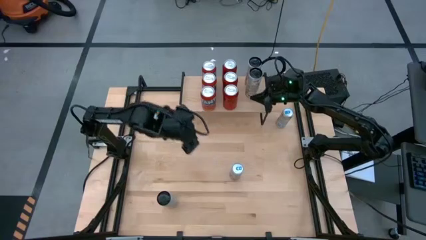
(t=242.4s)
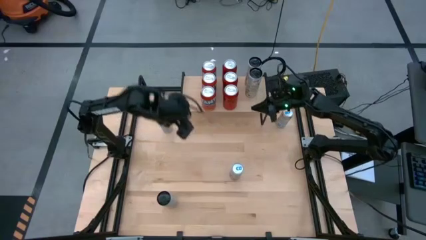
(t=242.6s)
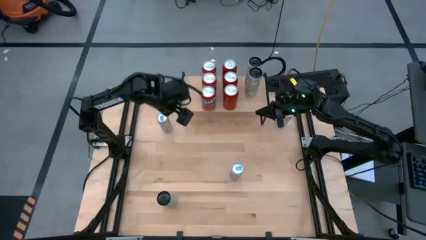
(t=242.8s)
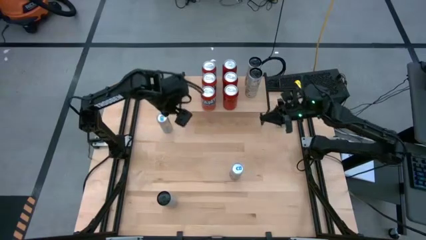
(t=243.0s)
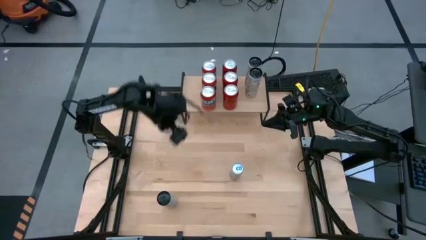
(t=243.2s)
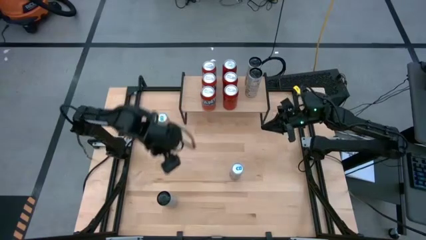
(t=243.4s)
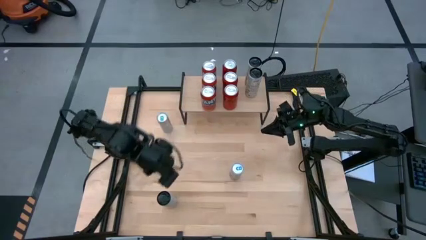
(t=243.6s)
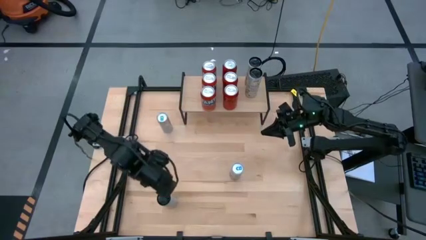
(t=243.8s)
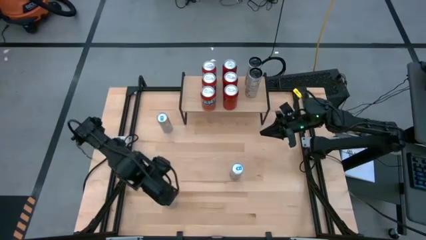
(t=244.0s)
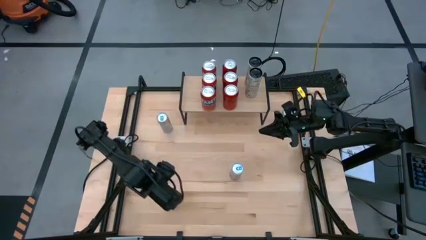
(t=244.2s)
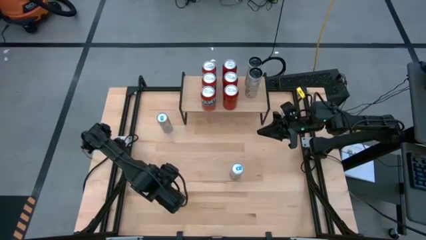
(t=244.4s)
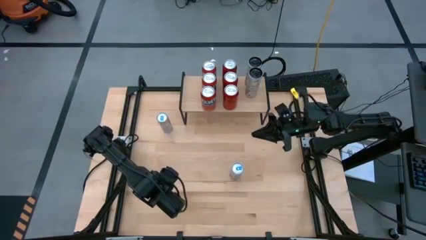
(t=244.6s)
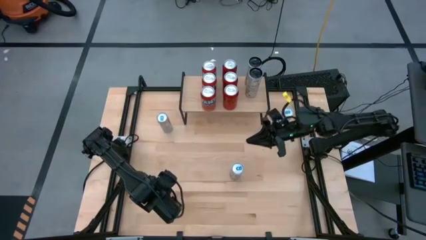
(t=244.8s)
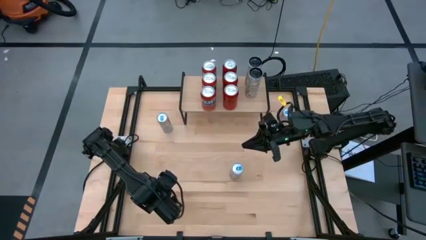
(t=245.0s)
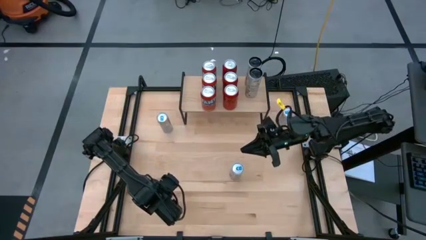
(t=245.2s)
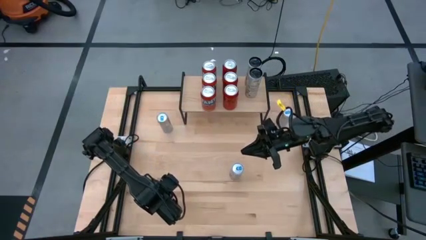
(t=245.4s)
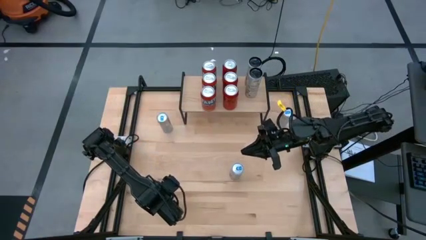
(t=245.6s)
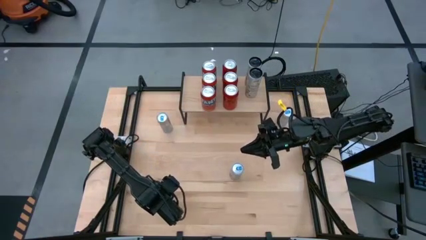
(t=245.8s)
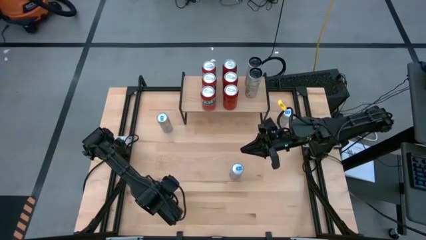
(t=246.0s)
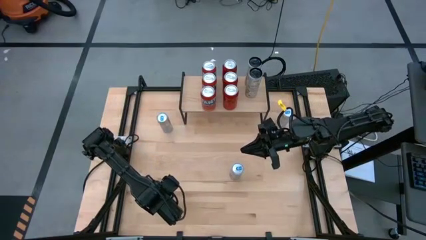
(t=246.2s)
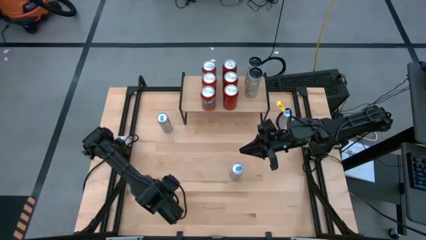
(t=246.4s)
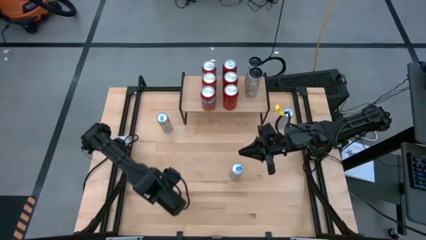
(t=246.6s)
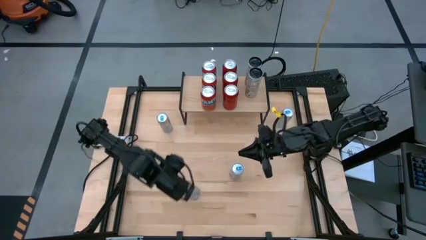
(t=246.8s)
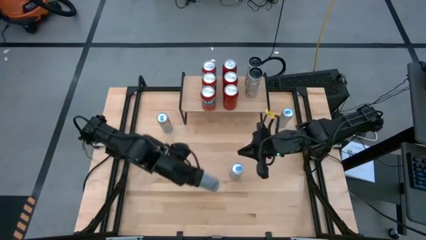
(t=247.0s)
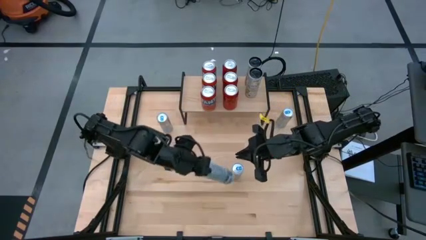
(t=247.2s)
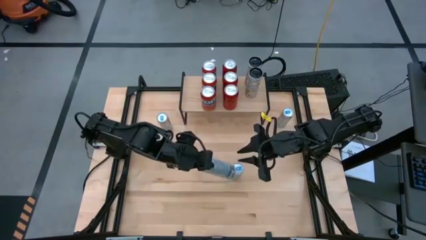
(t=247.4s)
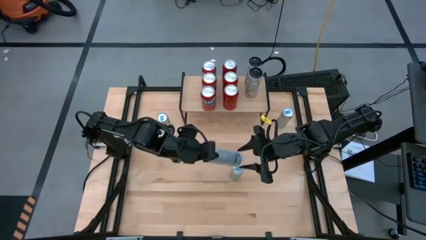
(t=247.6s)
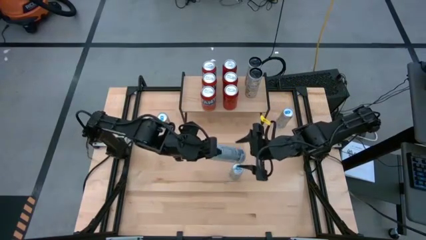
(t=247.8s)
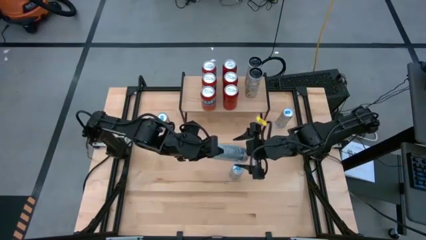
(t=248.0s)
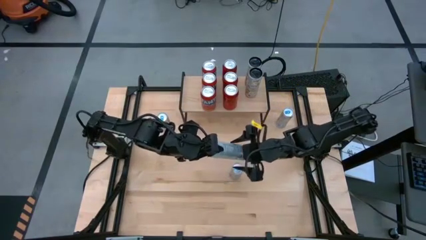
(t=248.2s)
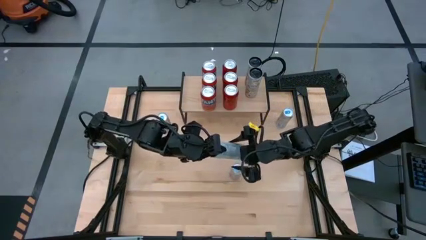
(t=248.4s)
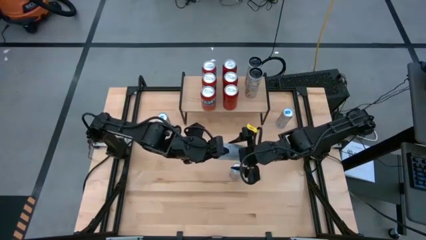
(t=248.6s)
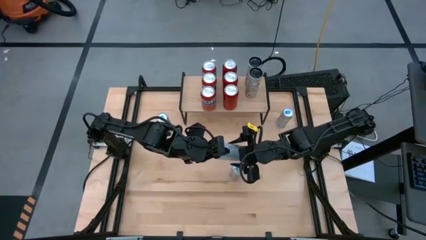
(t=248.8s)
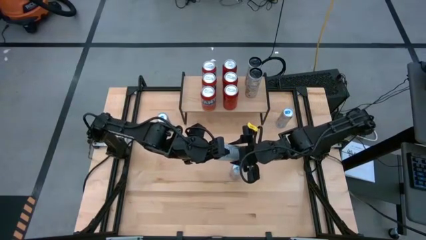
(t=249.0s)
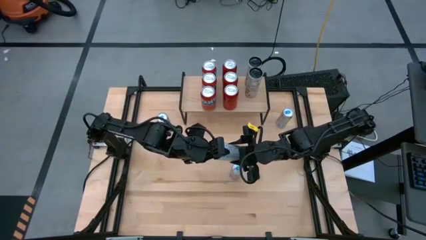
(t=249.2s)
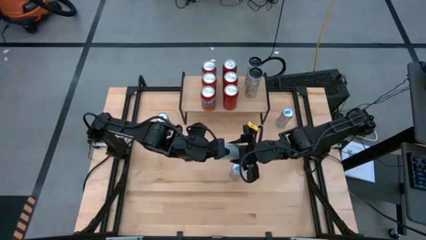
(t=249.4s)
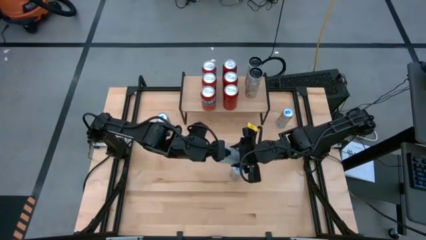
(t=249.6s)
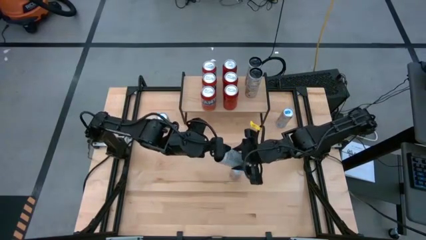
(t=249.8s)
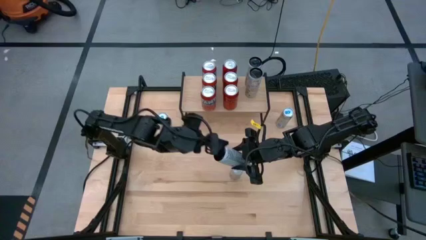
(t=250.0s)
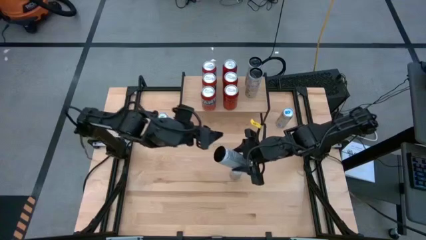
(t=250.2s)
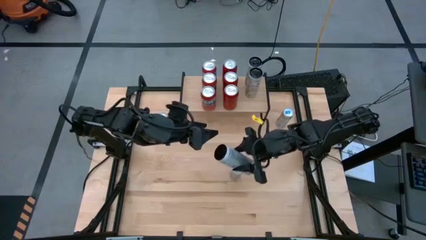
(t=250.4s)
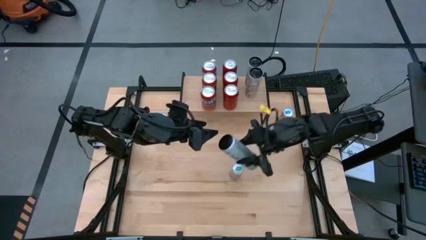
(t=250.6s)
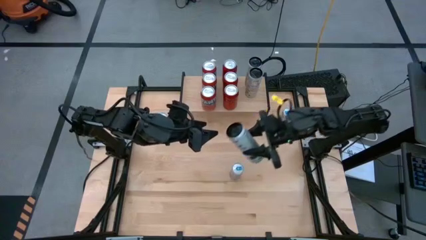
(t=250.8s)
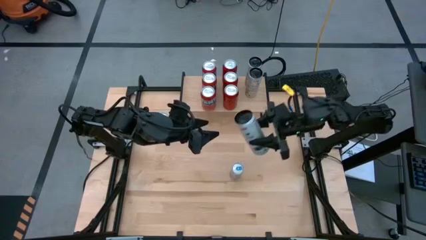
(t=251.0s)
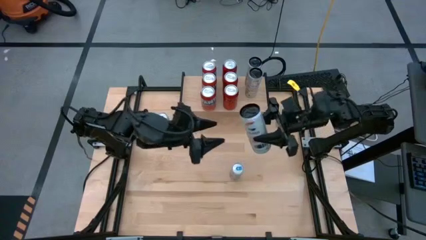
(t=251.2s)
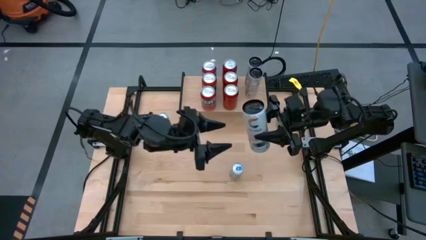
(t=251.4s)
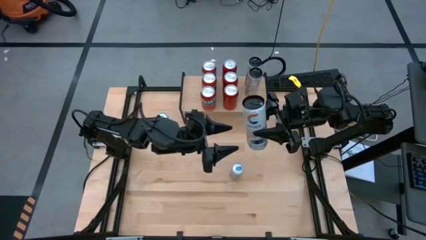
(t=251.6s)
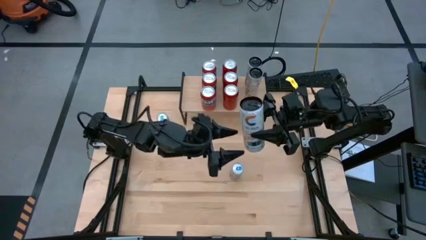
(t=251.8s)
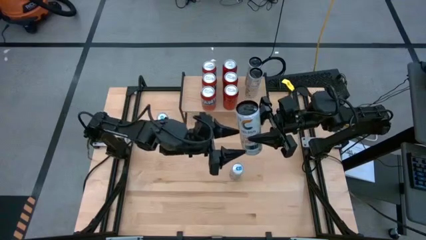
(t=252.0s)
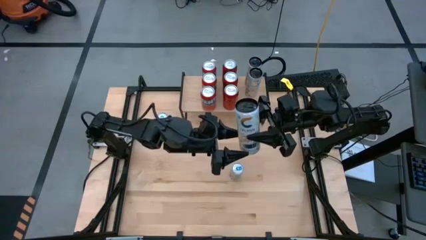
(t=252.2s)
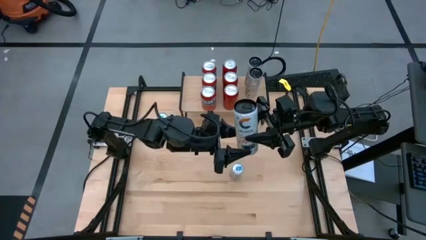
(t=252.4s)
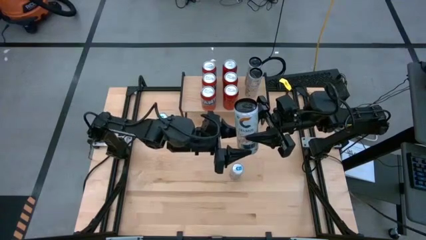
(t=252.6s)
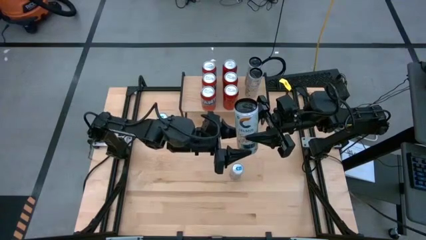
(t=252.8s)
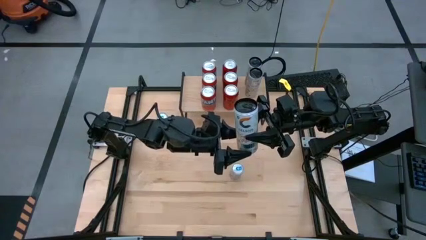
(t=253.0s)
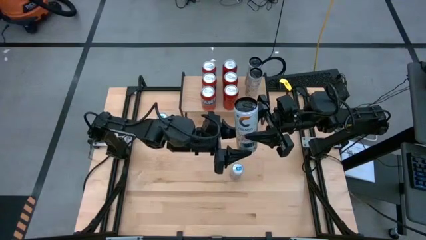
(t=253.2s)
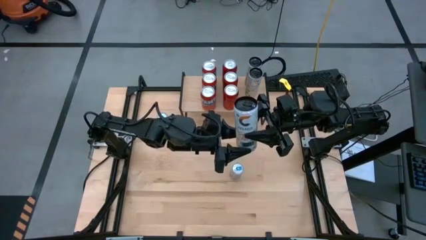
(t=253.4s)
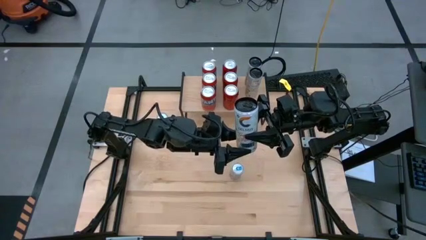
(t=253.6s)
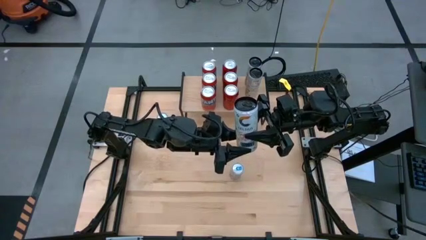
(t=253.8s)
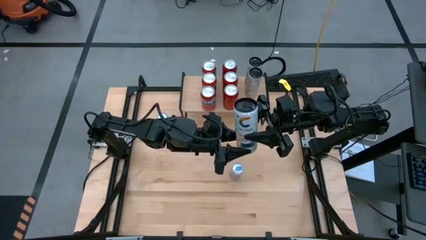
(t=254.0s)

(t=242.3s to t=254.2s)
Task: Place canned beverage on shelf
Put the white-yellow soda can on the shelf aligned with the other white-yellow soda can

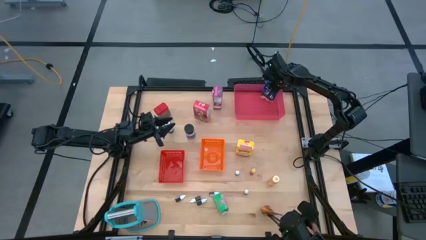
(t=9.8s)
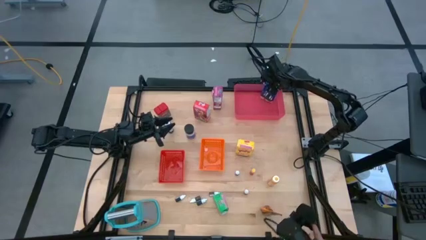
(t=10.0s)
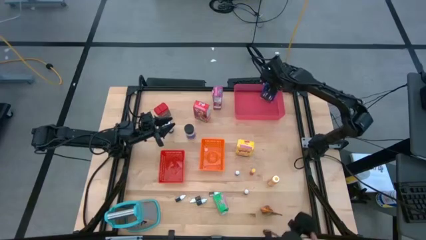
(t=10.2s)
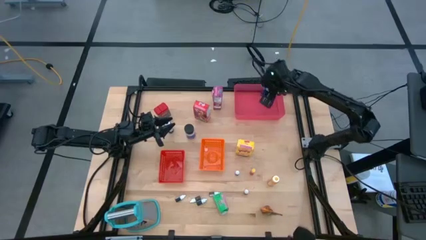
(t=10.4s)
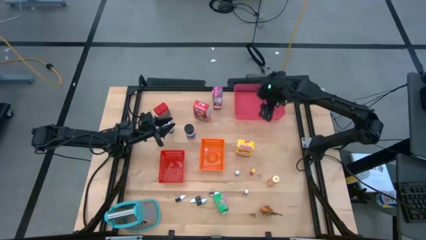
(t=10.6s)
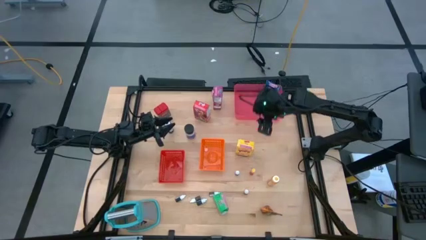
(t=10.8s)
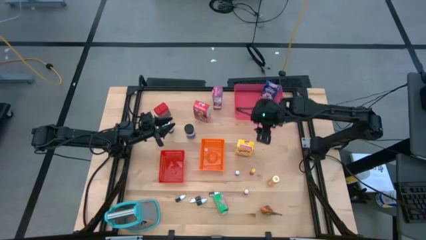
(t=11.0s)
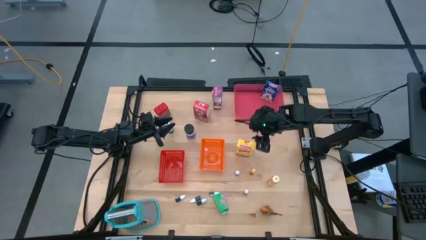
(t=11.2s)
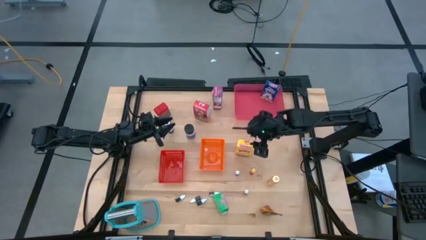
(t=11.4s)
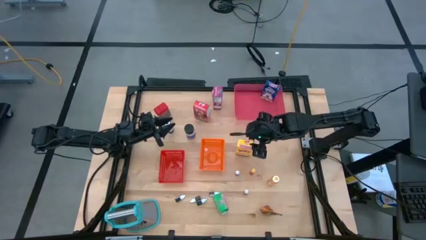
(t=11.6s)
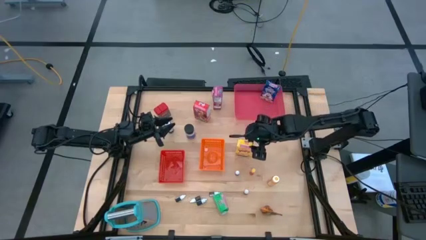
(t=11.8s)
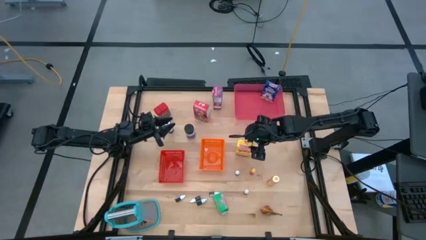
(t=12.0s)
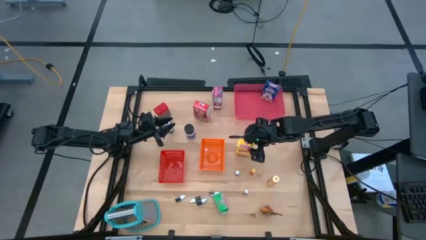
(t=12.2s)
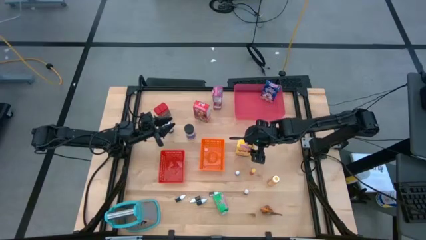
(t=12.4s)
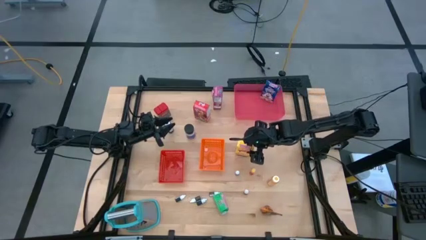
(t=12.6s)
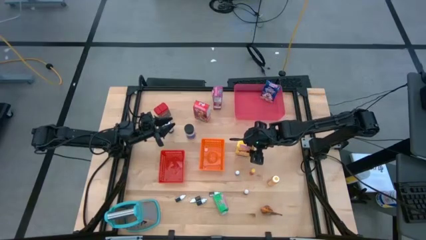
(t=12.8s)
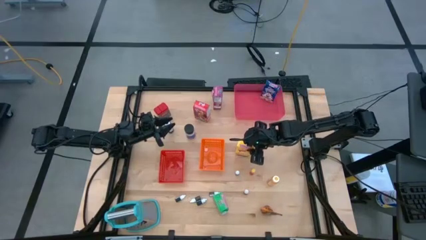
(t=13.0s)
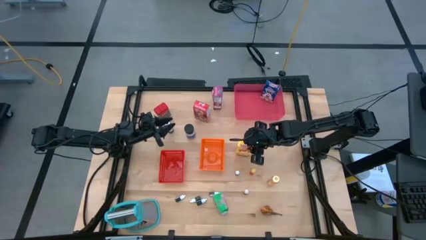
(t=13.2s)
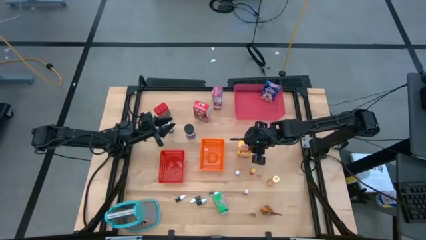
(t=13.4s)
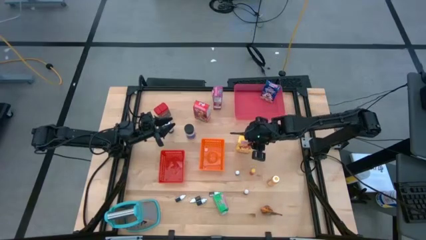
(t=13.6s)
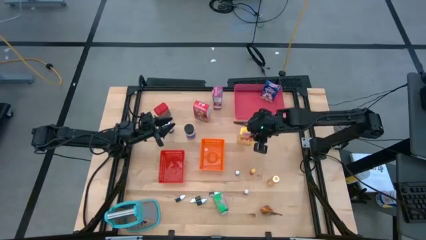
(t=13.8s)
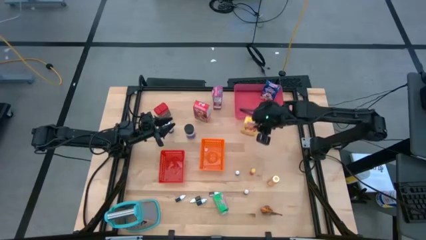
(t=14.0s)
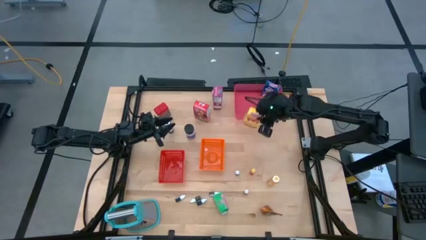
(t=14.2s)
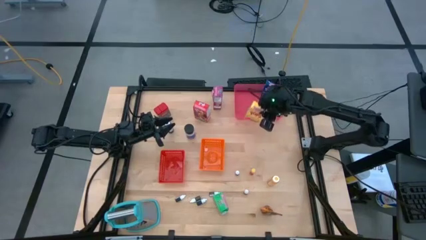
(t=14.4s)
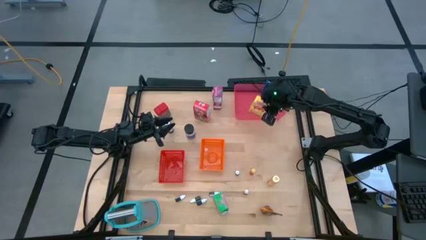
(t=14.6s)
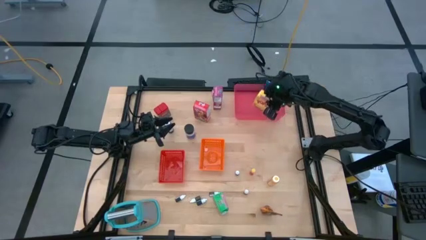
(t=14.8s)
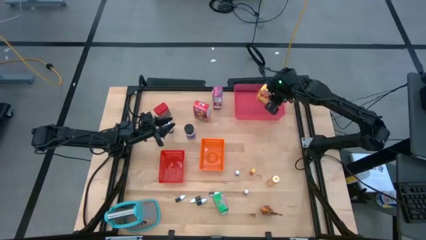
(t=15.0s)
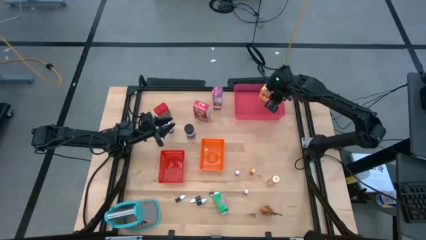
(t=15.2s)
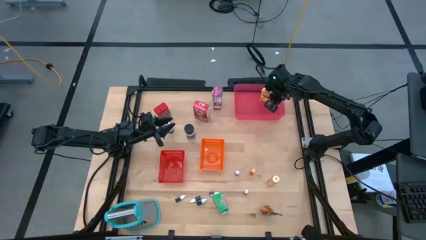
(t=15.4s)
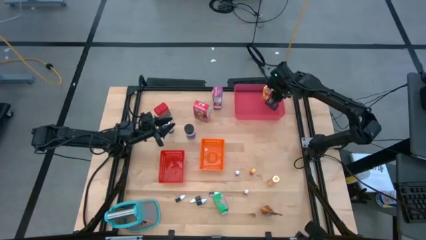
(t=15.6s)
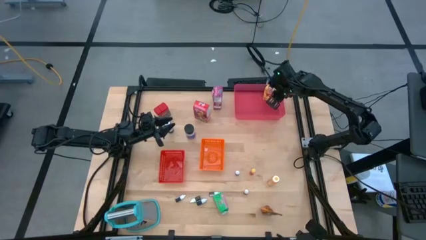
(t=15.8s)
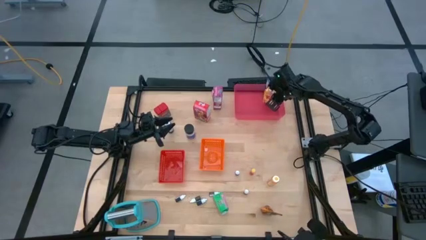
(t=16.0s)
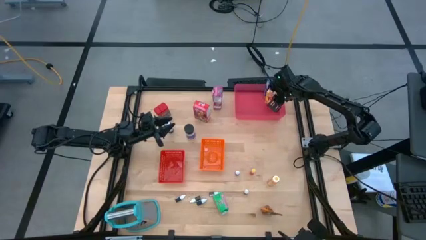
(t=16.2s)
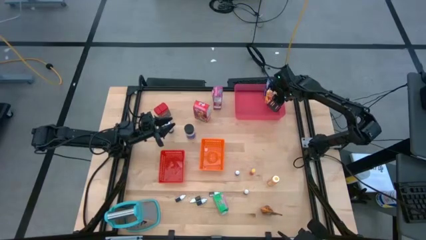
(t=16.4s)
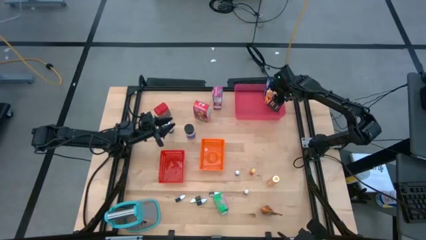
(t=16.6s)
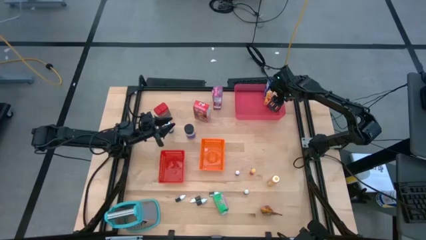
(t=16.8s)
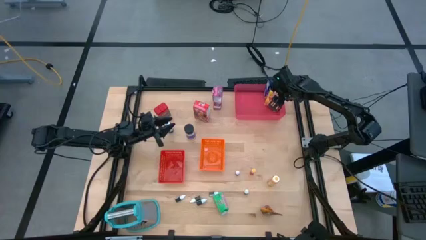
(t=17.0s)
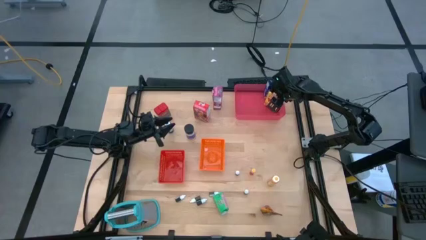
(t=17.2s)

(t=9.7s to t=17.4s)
Task: Pick & Place Kitchen Items
Put the yellow cereal box into the light red bin
